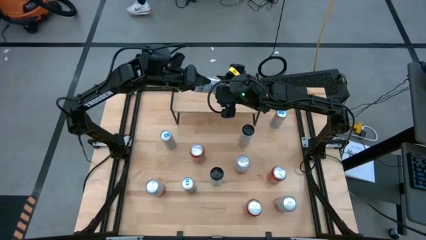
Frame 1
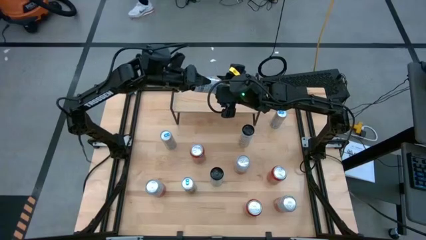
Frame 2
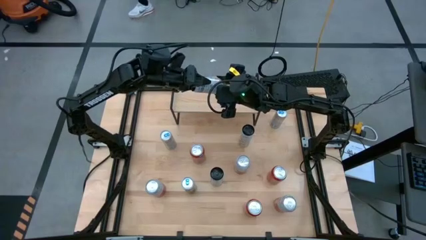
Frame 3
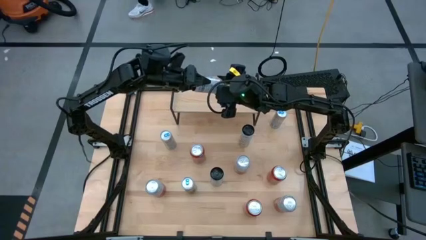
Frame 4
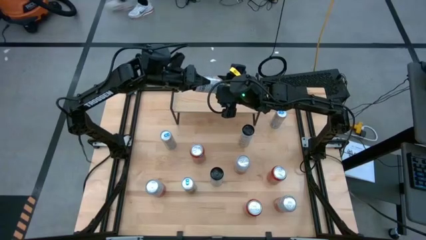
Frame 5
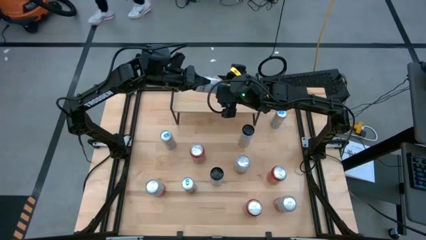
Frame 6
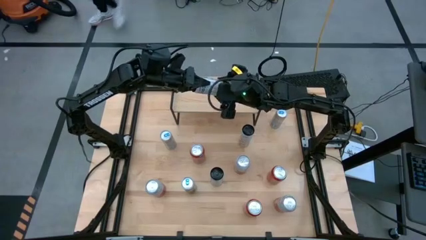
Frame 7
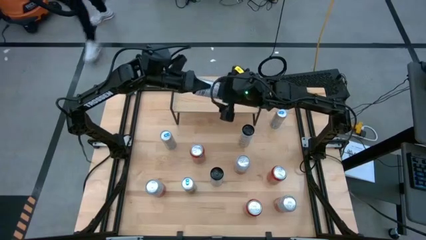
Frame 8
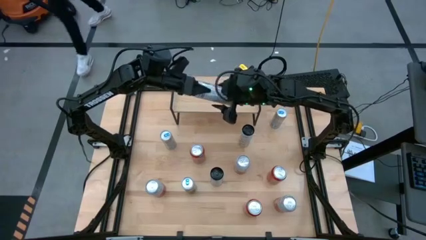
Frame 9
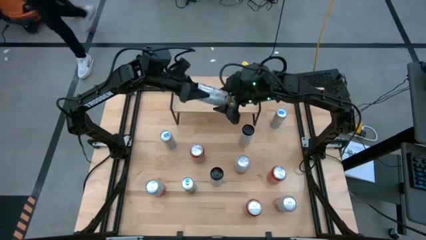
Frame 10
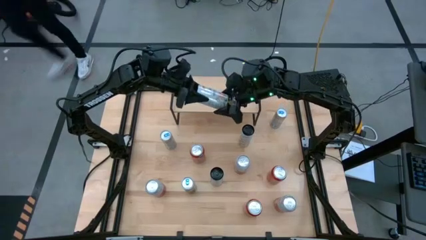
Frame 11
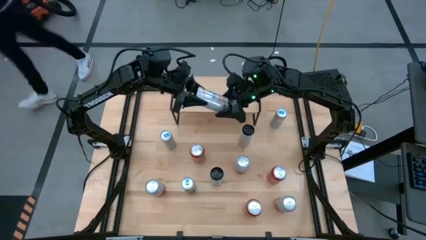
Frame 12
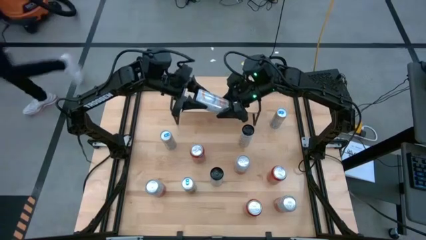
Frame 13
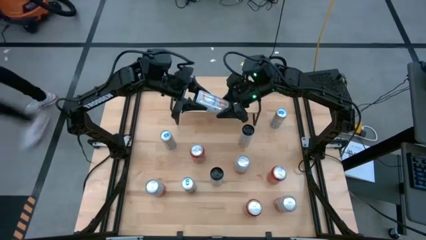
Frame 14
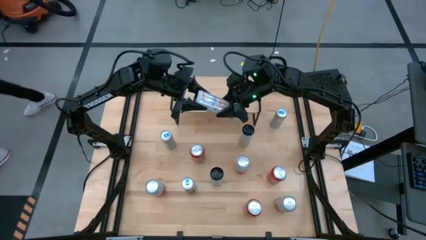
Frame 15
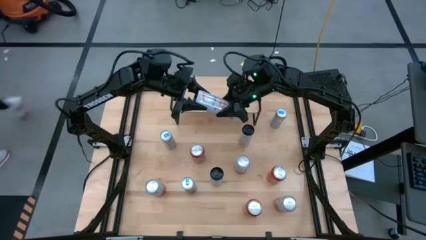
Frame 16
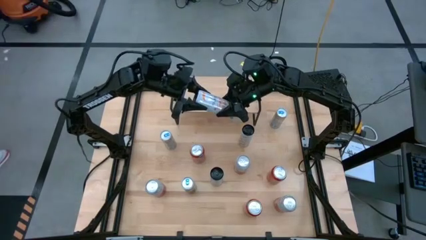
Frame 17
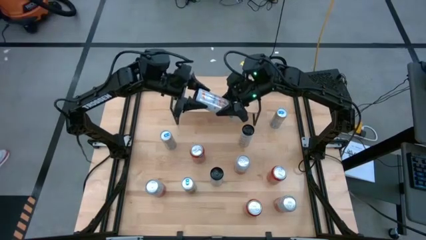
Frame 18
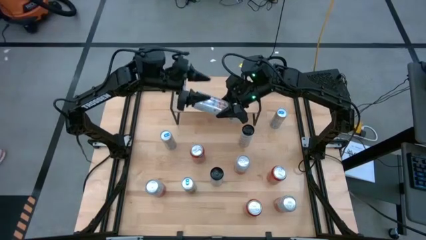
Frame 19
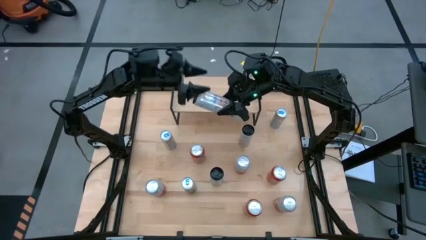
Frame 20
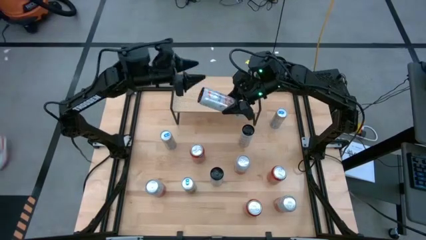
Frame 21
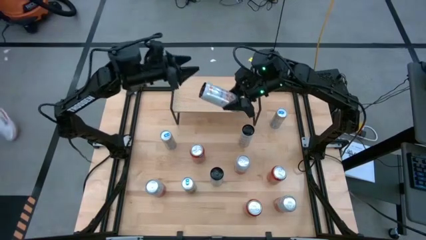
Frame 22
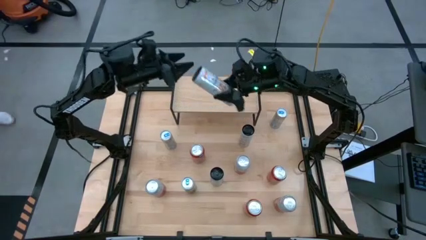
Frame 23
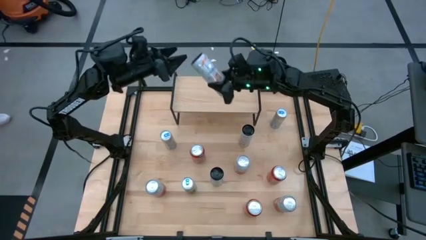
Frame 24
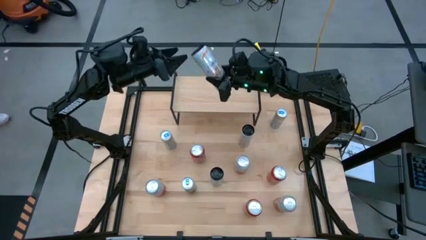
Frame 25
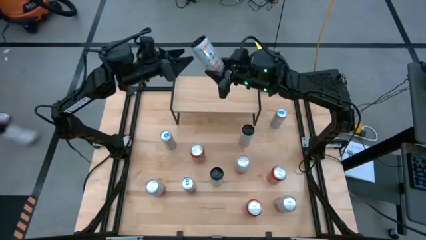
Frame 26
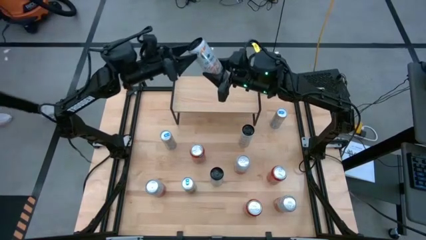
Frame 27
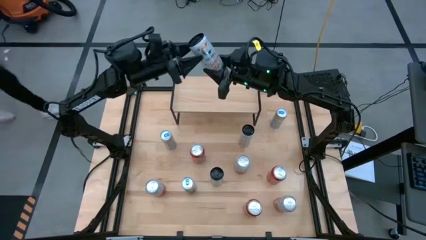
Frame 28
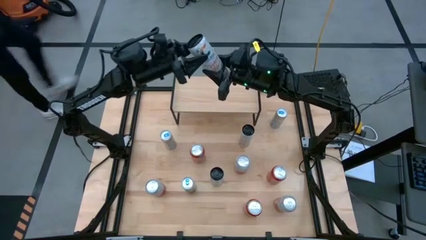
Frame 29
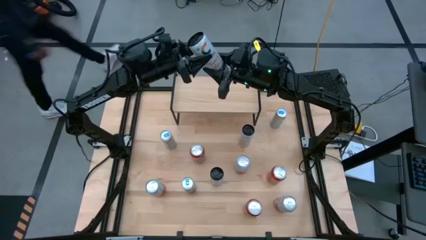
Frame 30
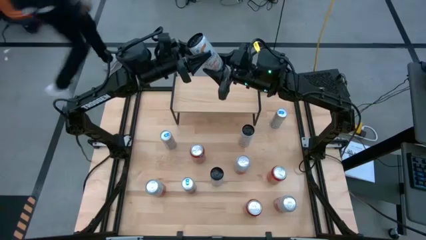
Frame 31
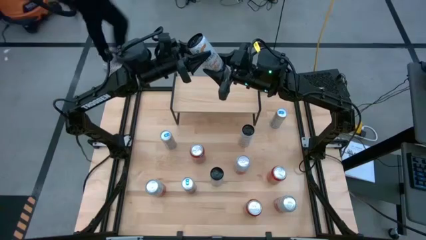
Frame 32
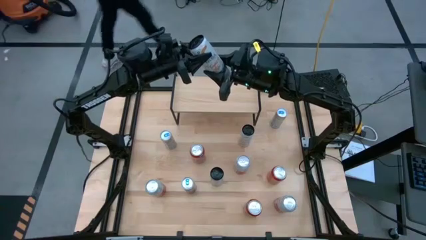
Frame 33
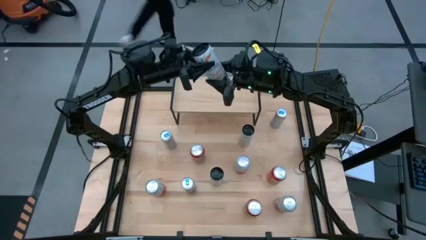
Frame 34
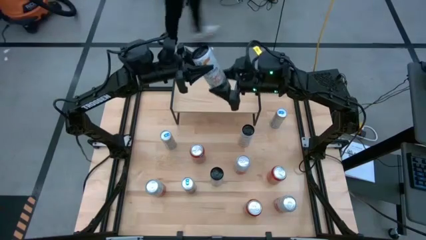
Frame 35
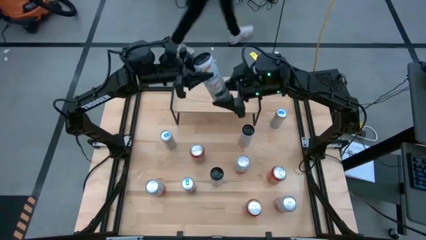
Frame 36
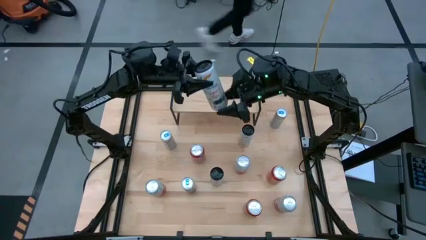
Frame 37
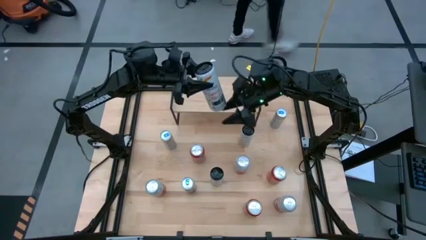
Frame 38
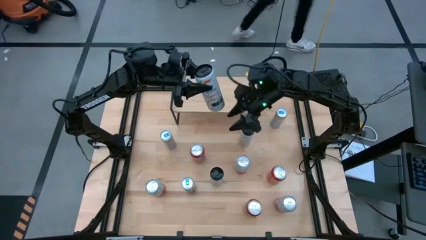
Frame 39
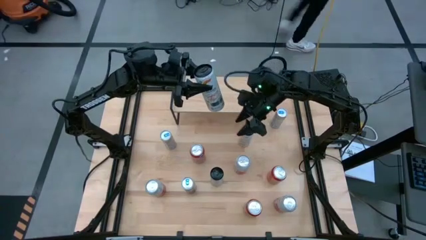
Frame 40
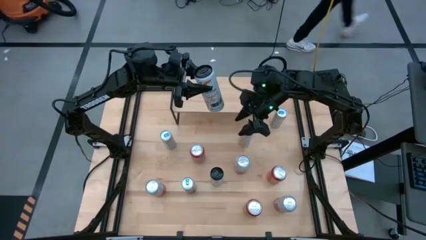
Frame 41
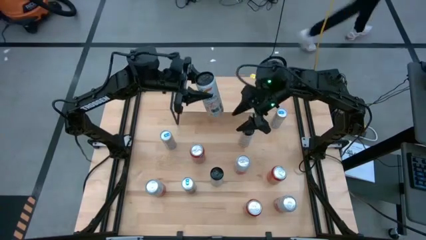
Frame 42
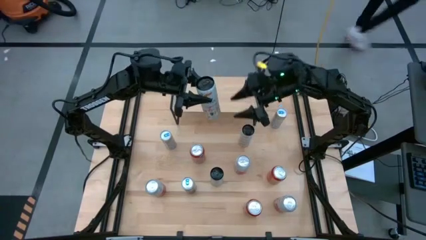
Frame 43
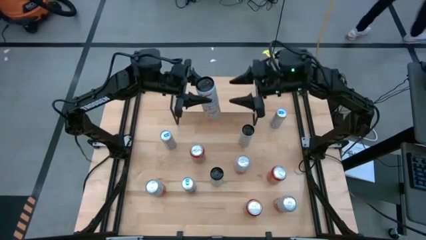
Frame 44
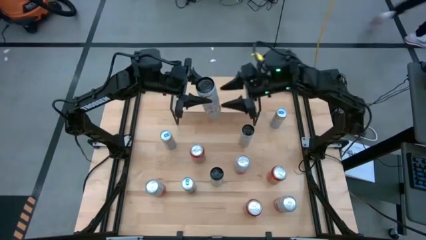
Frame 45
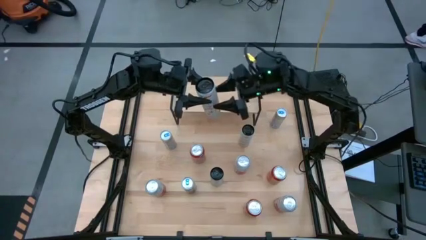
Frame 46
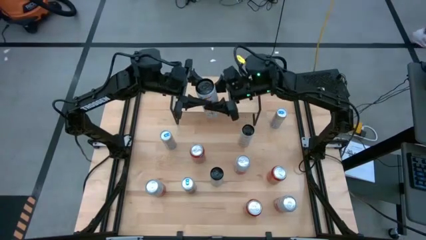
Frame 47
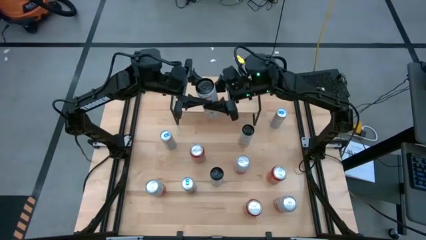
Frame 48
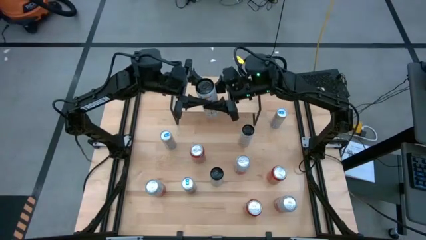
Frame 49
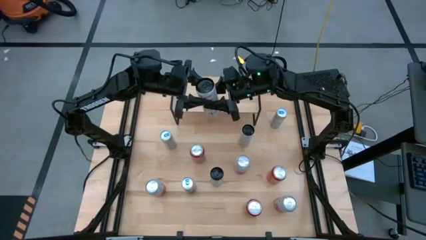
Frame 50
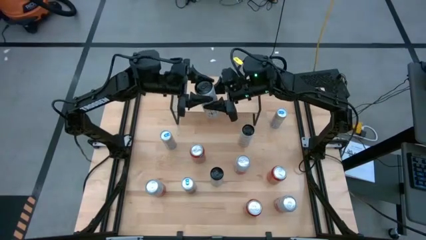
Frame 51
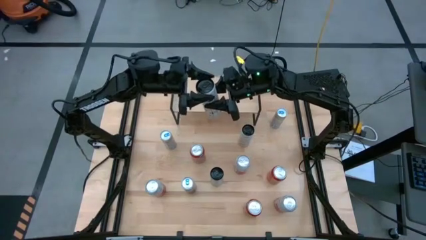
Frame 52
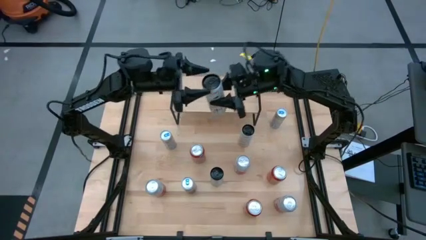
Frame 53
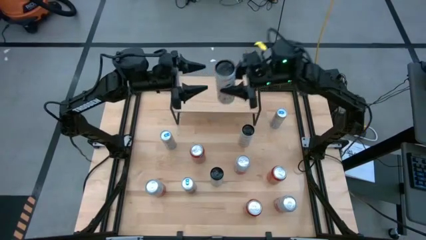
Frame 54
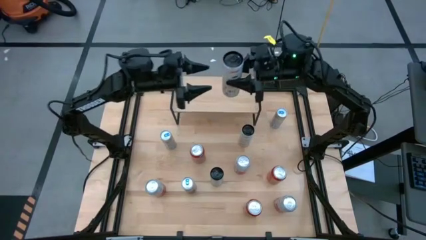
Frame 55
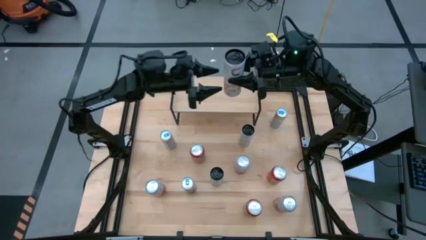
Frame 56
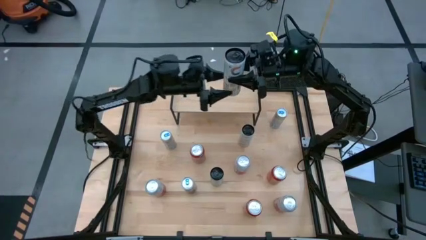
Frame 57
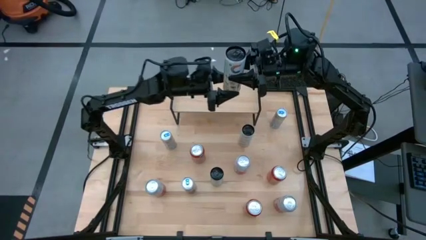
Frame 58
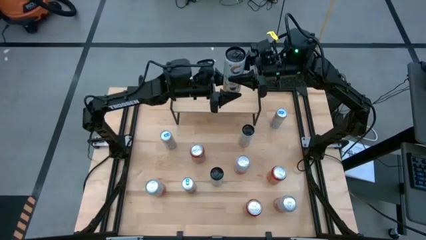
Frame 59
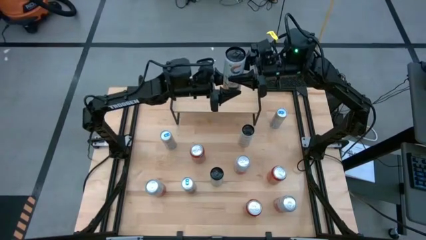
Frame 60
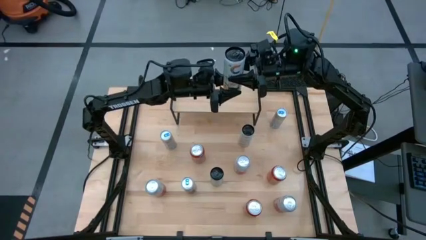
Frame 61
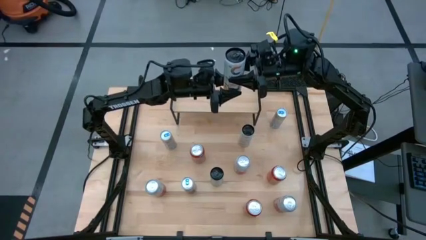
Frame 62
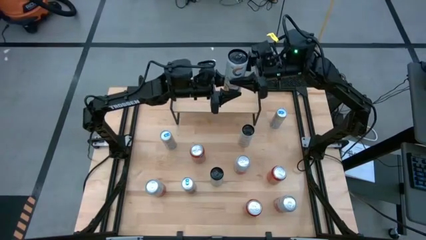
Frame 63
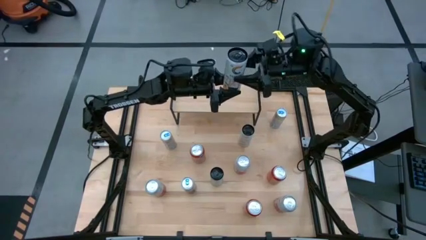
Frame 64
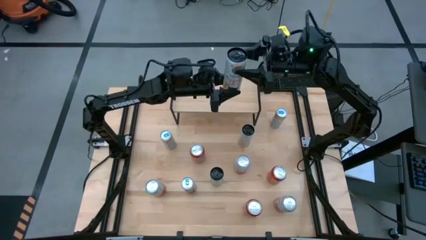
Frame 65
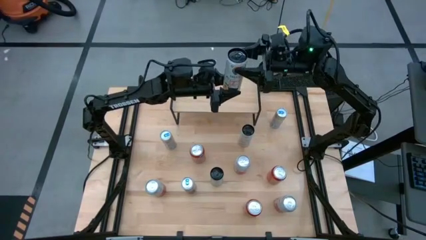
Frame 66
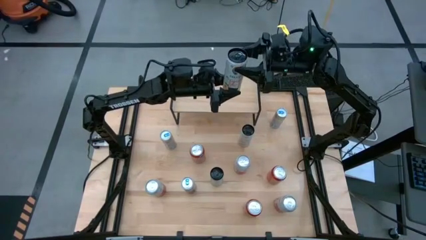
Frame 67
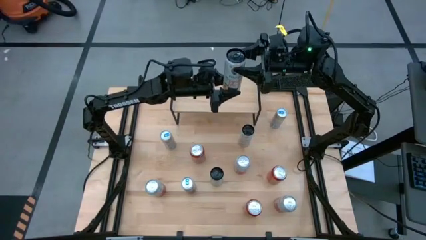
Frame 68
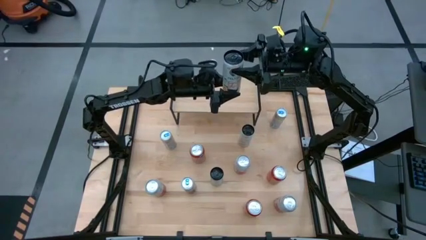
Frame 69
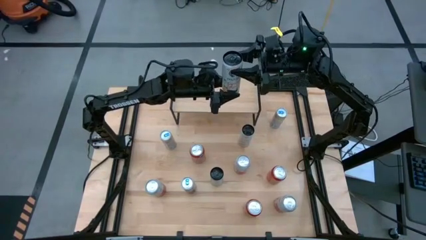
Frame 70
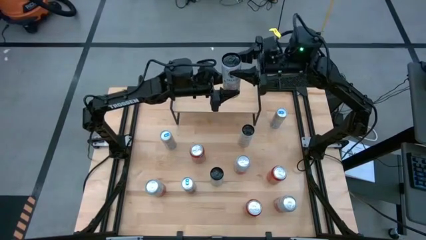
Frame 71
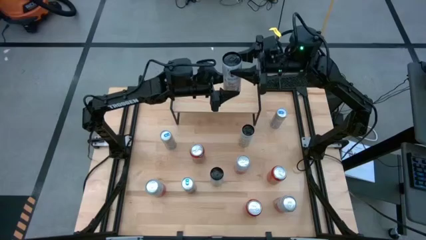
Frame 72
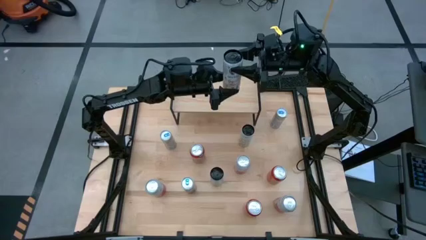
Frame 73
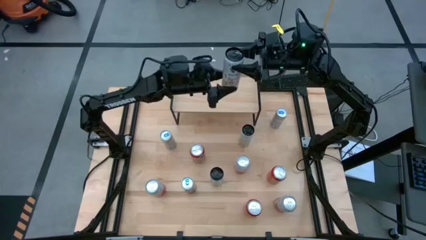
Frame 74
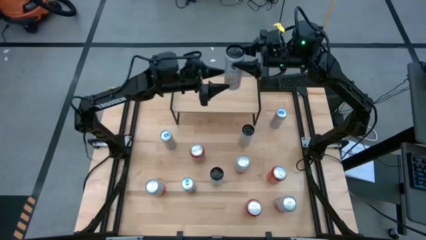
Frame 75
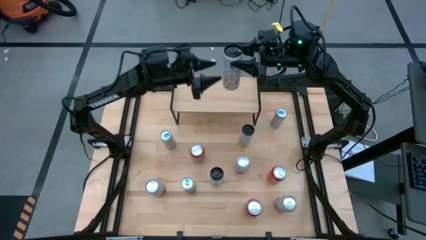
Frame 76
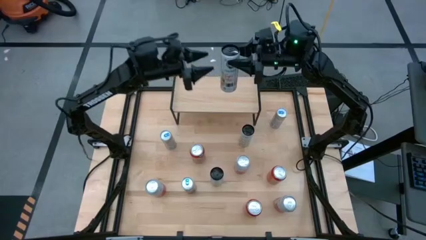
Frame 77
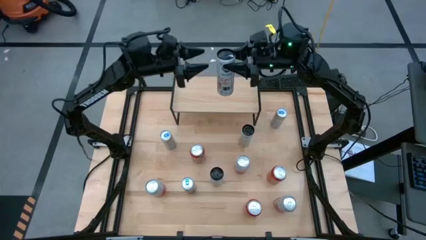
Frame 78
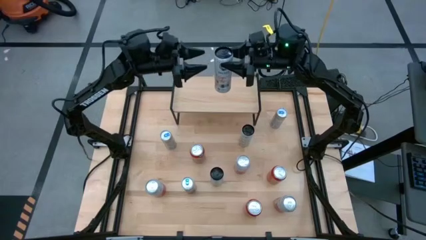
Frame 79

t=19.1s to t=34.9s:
Task: Place canned beverage on shelf
Put the top left white-yellow soda can on the shelf
